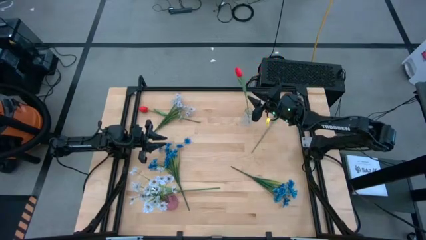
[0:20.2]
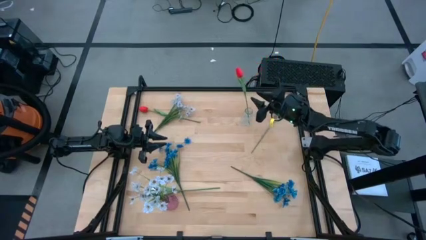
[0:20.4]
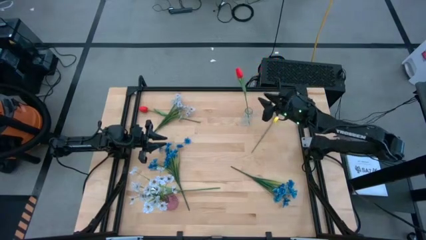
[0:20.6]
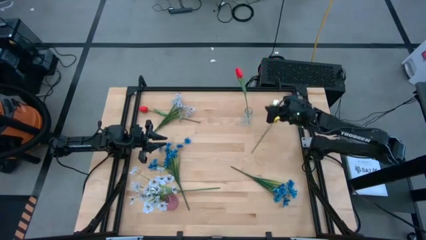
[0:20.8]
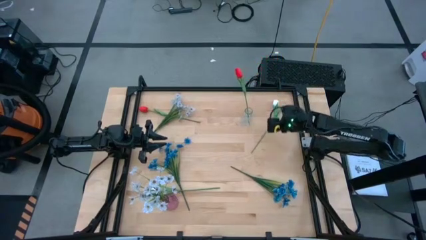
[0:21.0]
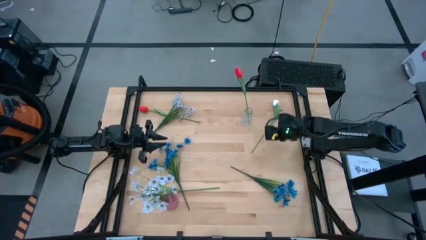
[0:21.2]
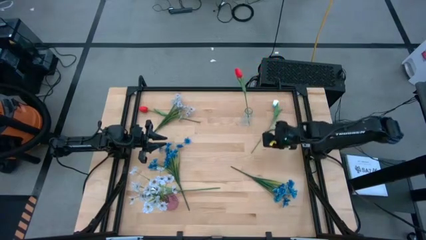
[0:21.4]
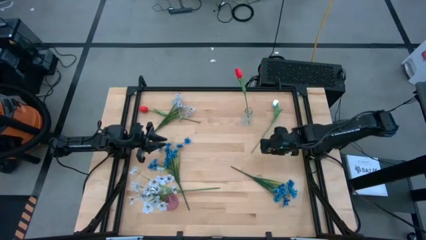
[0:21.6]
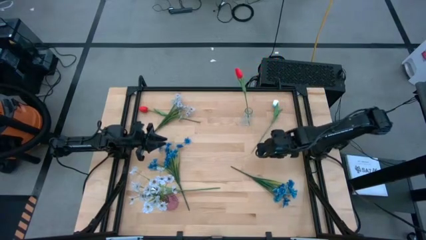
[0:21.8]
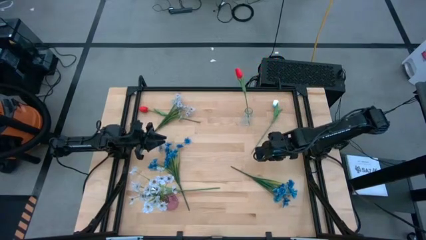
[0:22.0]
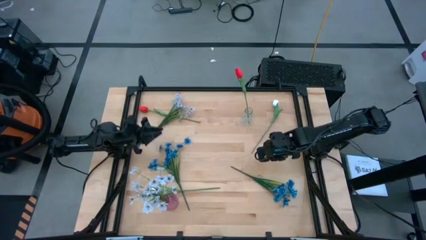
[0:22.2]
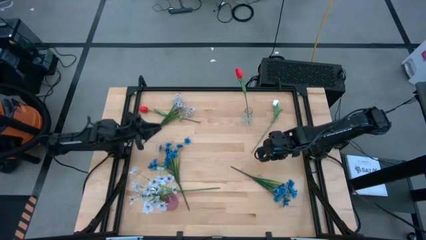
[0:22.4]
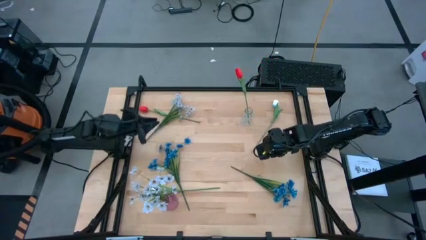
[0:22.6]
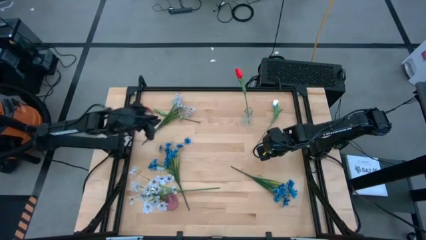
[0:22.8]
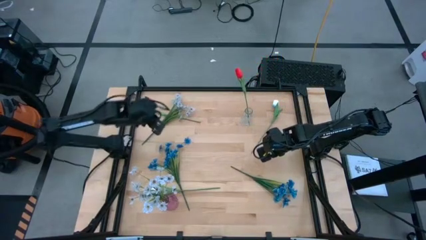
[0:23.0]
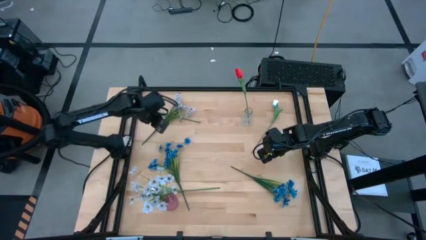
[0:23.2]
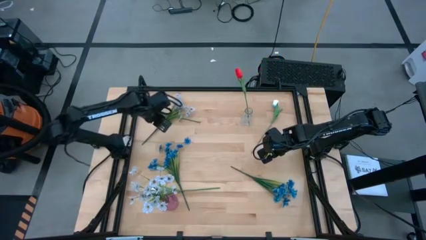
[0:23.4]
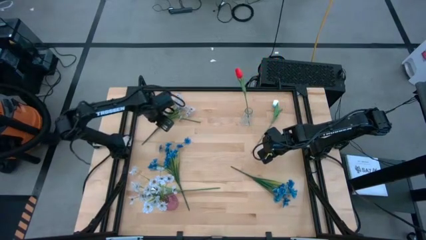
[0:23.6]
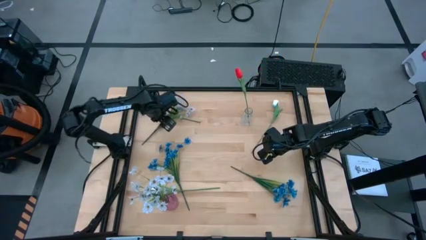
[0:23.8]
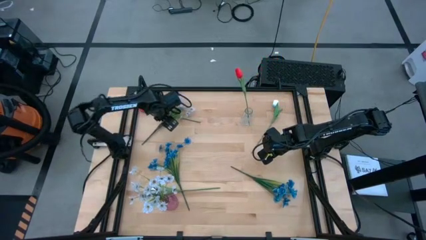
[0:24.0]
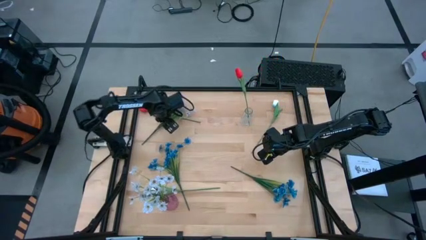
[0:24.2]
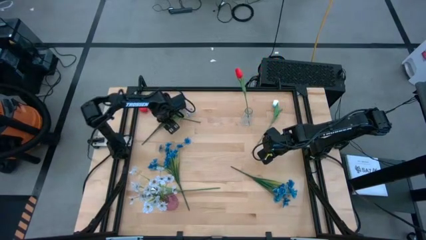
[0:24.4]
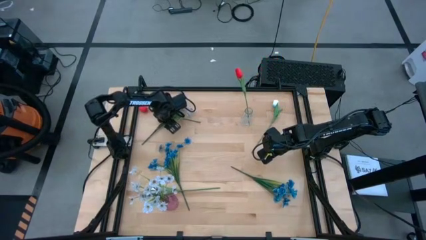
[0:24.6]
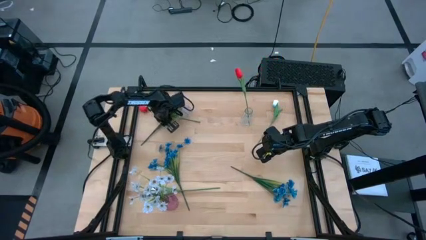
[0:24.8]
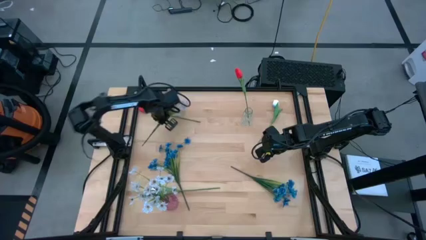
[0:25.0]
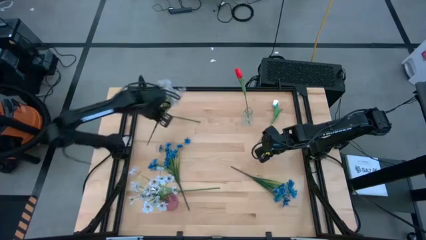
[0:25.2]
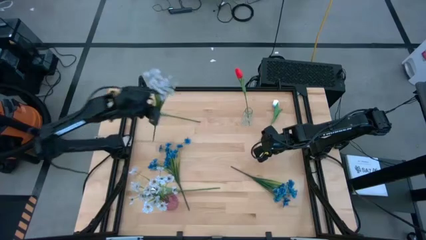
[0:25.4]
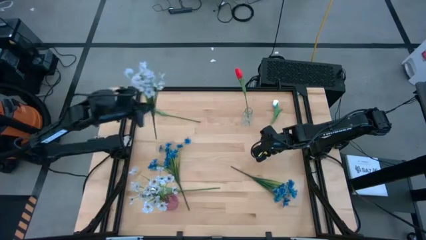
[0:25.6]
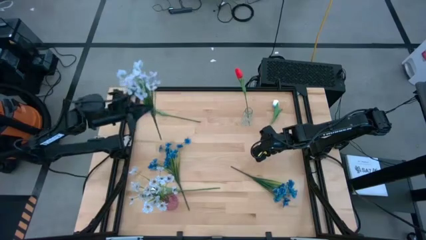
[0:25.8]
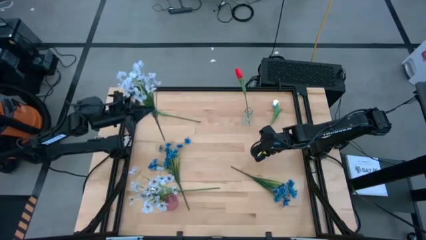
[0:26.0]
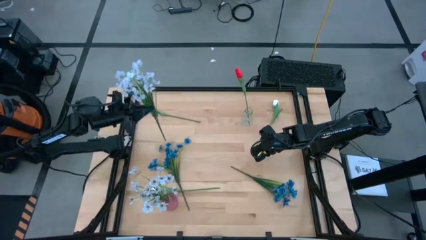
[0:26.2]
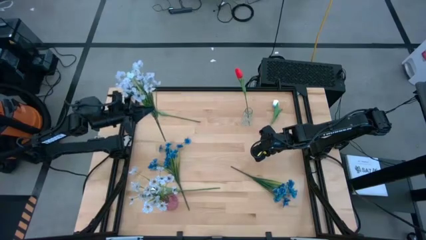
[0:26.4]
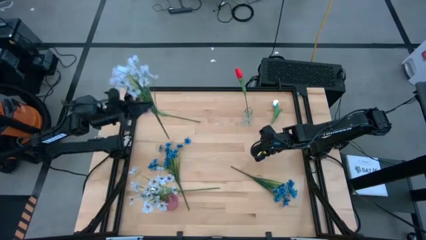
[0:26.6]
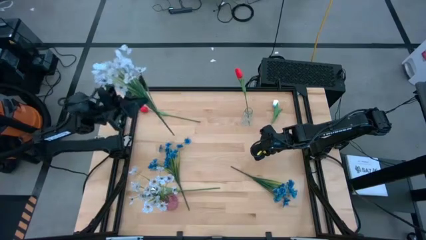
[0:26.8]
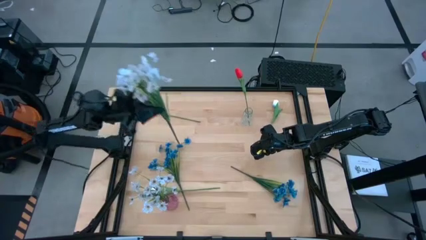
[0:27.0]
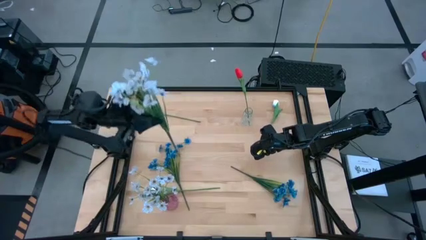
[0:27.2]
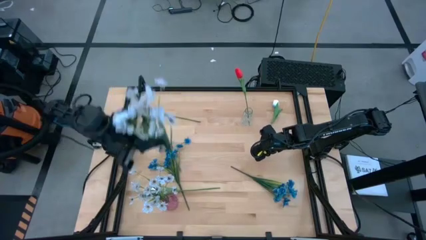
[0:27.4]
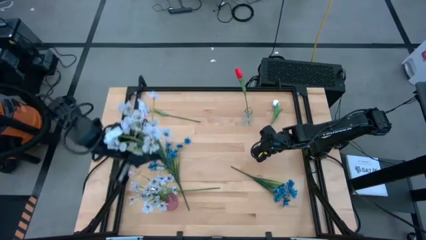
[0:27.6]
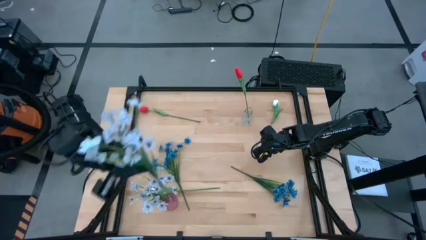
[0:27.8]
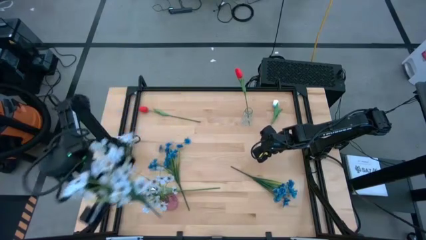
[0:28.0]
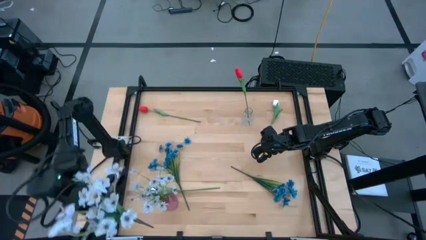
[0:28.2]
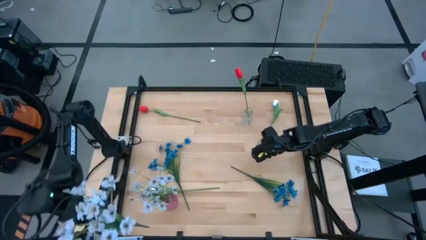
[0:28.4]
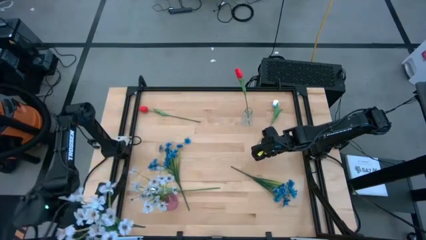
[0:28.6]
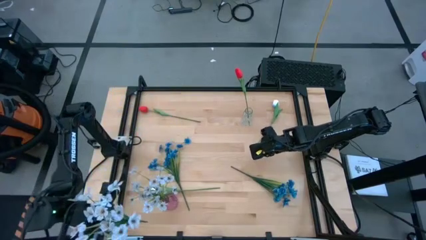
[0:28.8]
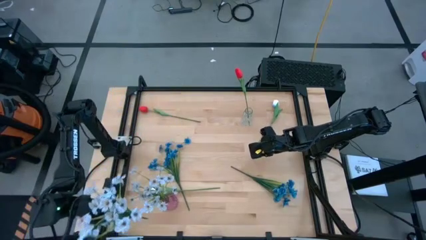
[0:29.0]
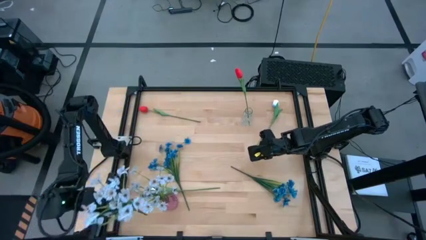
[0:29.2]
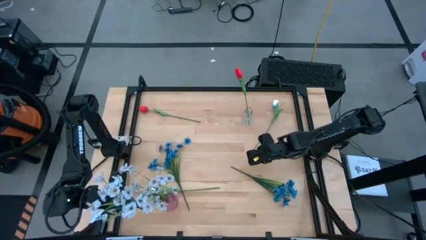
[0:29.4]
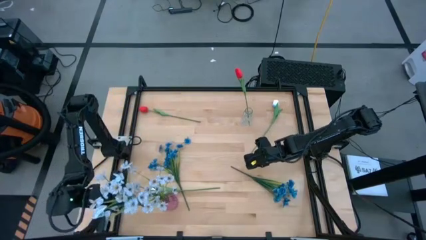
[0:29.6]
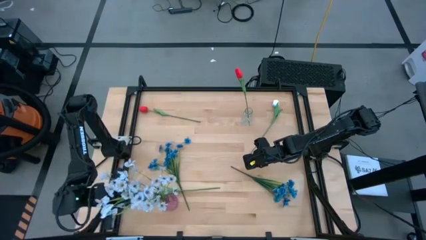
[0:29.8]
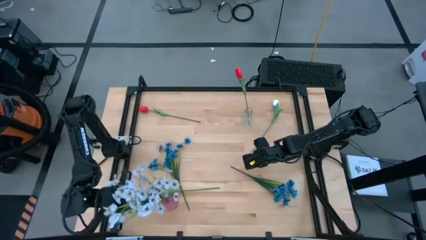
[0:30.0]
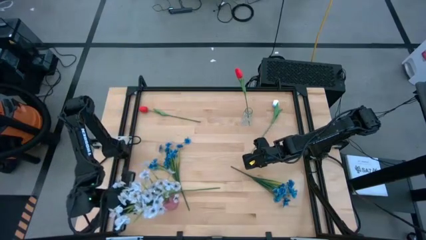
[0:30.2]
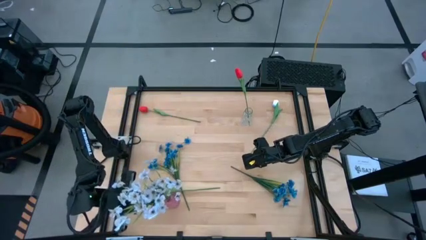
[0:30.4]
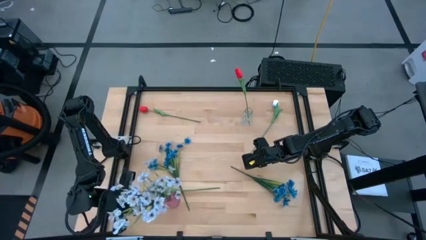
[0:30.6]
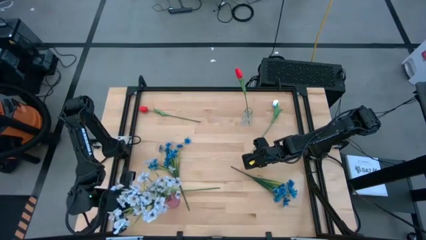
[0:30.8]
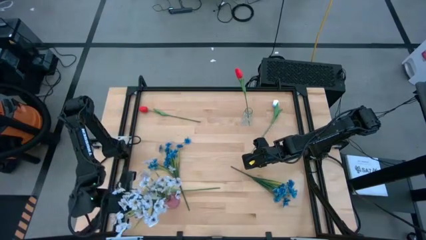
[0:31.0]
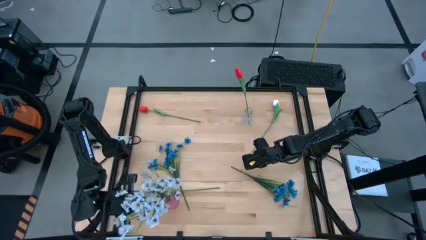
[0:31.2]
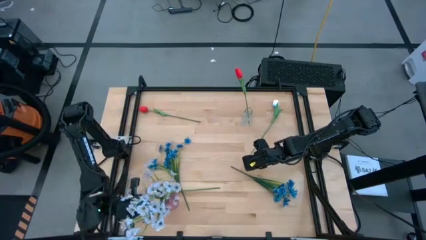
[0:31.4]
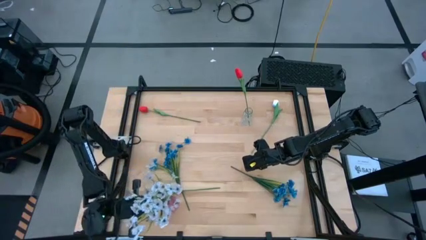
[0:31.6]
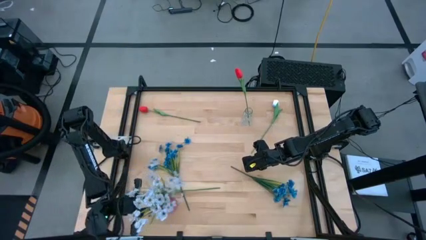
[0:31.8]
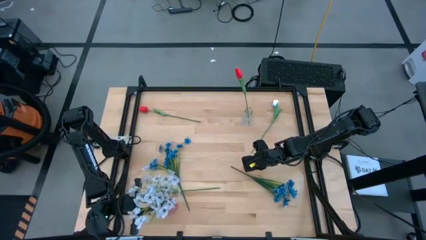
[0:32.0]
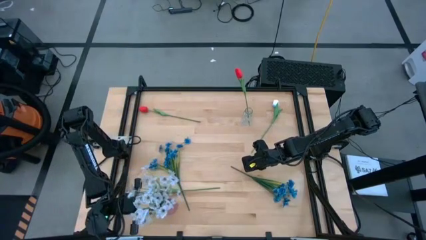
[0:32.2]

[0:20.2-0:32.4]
Task: Sort flowers into vase by color
Put the white flowers into the pink vase

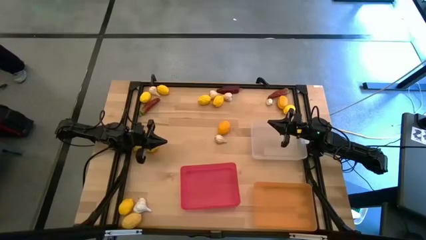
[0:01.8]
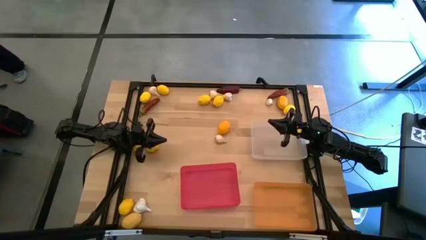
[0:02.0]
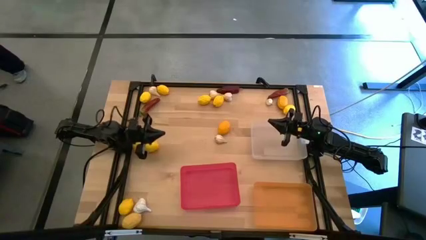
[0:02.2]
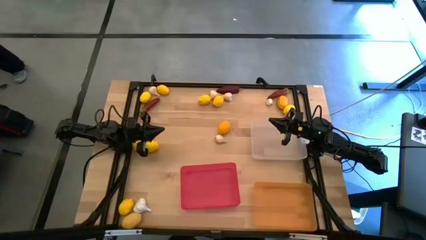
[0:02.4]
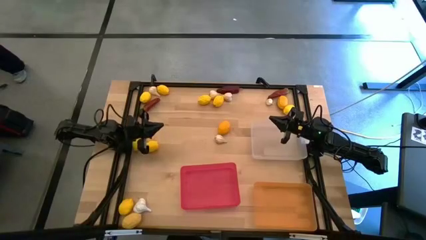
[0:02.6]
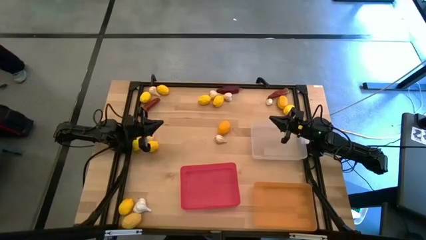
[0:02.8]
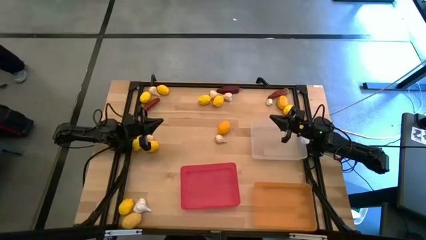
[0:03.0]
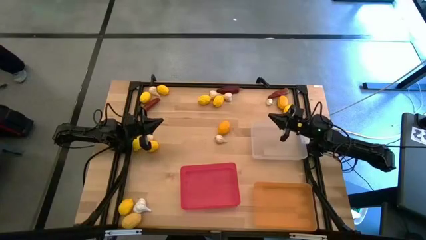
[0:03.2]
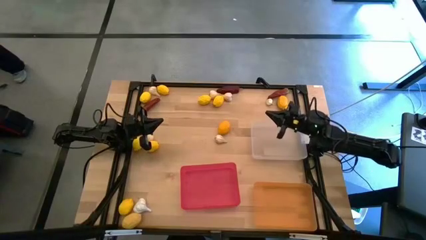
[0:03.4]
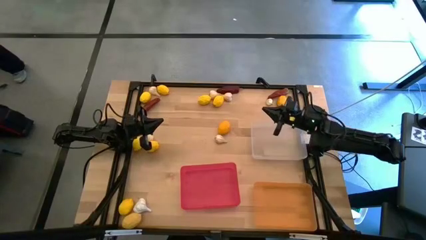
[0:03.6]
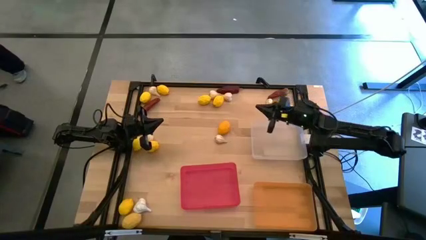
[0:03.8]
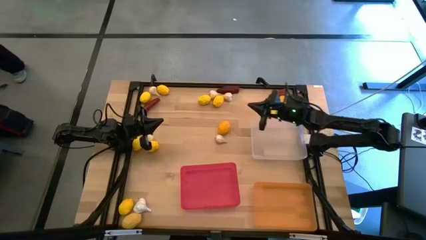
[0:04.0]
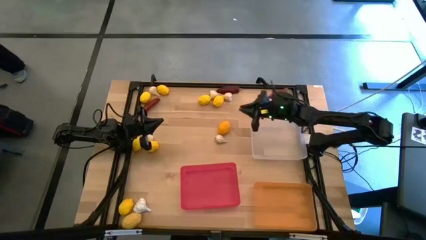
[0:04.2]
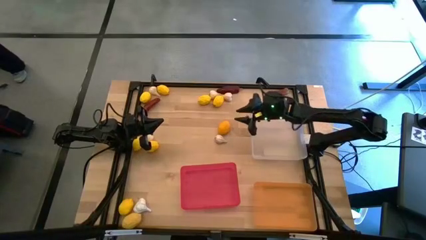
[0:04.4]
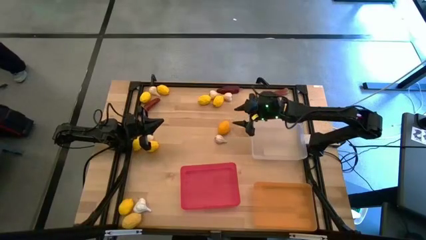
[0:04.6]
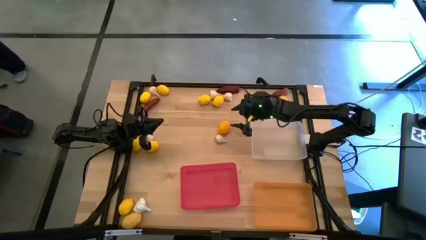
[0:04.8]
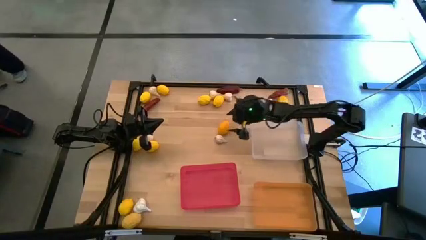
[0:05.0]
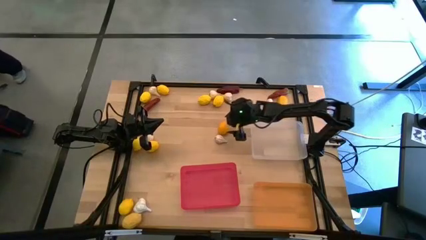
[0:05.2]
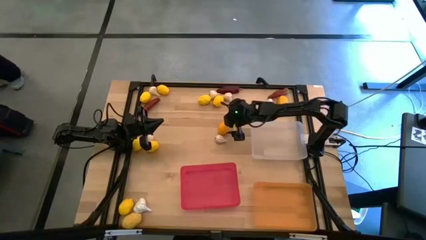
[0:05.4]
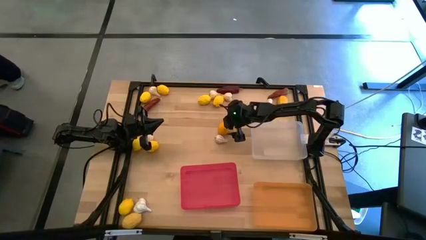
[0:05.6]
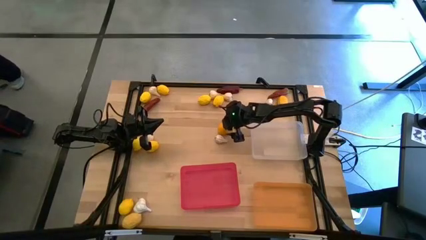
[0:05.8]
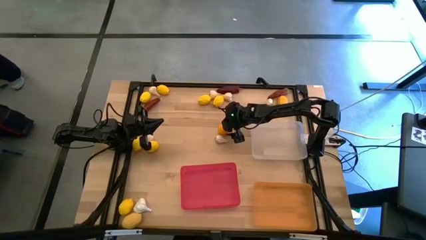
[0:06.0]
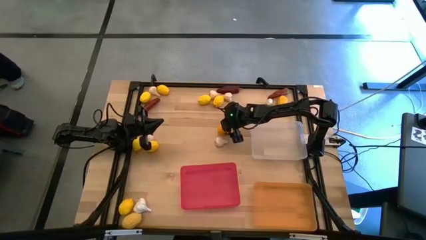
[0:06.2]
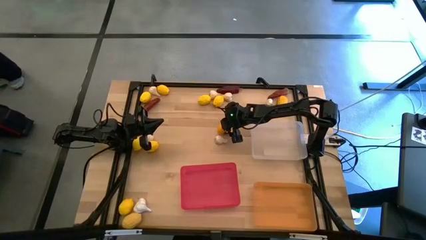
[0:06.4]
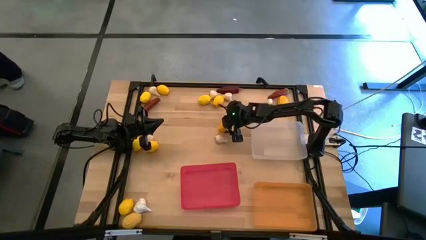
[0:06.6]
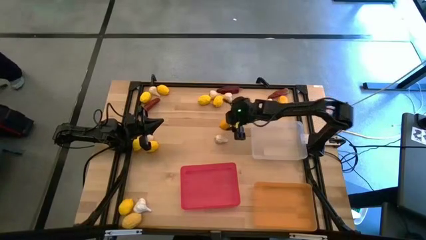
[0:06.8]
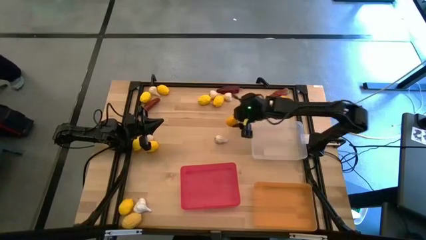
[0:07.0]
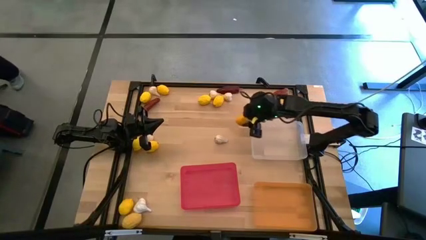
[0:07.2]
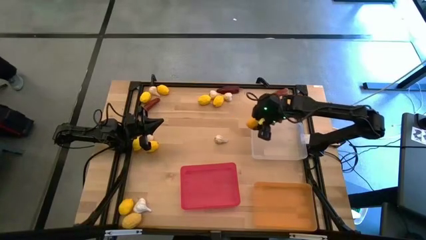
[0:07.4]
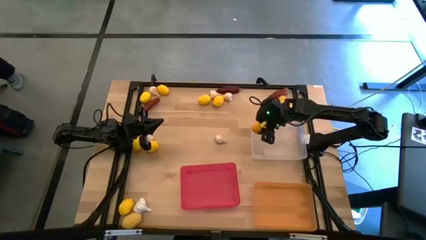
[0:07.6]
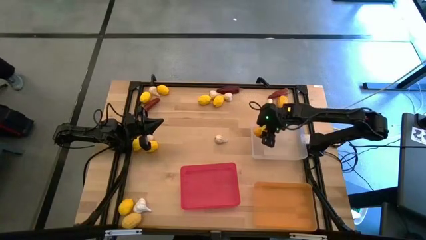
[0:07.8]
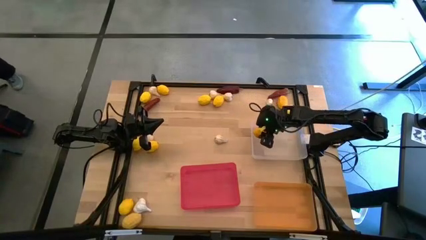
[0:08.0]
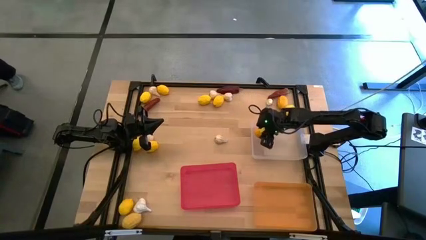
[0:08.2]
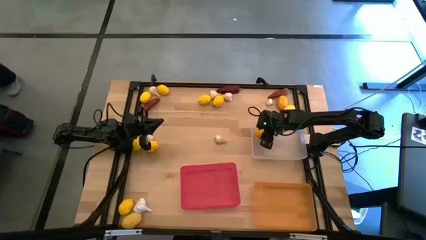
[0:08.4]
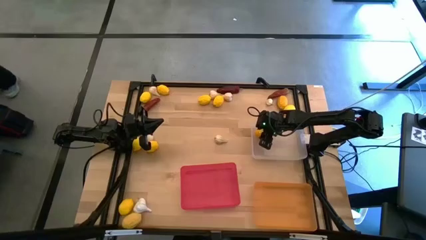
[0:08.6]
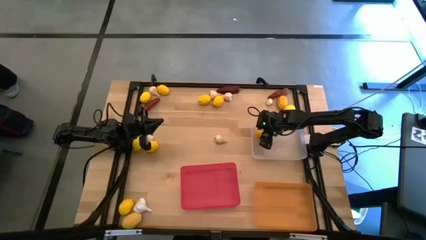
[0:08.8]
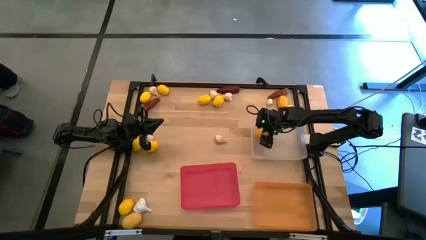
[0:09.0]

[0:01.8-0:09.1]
Task: Sort produce into baskets
Put the yellow lemon into the transparent bin
